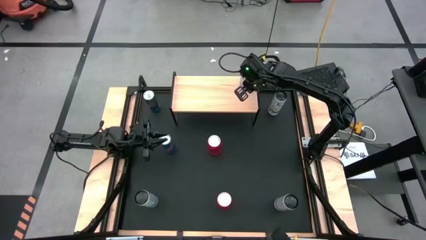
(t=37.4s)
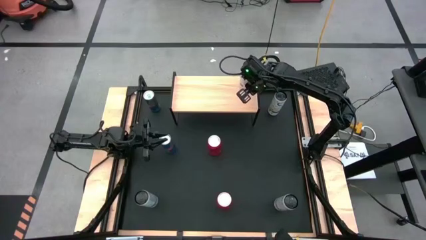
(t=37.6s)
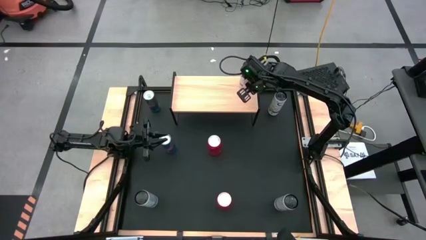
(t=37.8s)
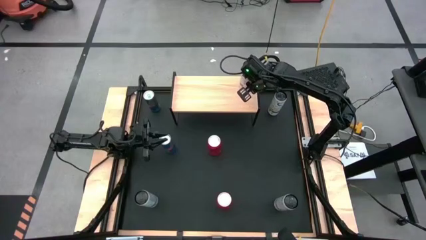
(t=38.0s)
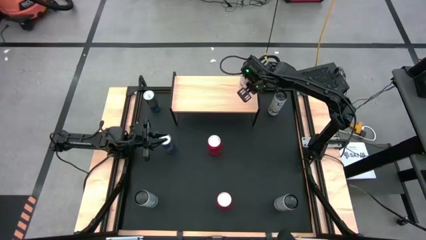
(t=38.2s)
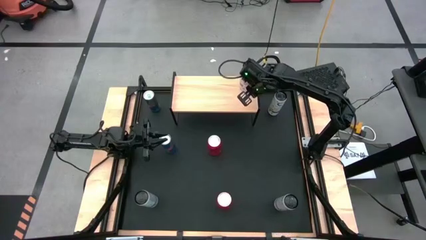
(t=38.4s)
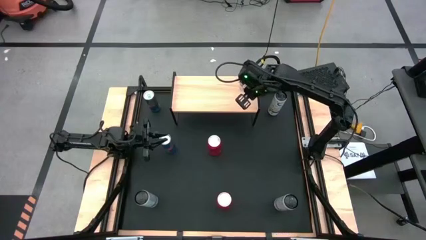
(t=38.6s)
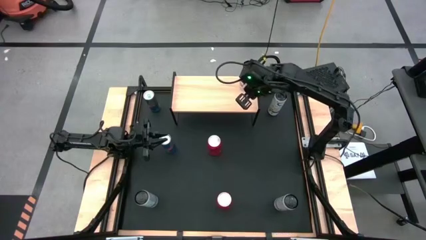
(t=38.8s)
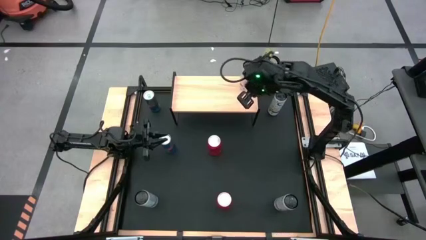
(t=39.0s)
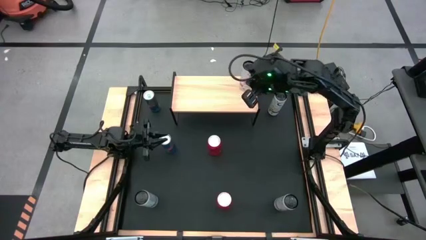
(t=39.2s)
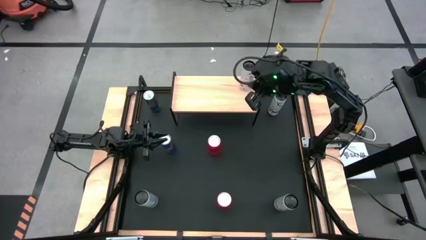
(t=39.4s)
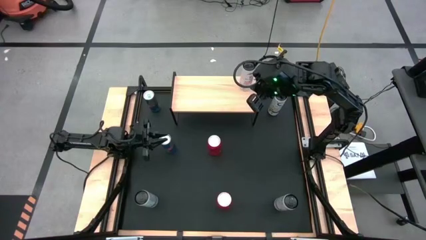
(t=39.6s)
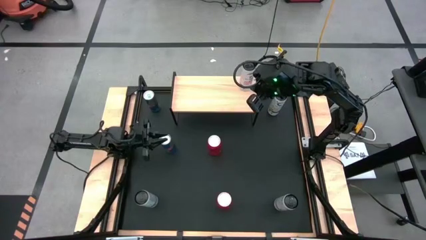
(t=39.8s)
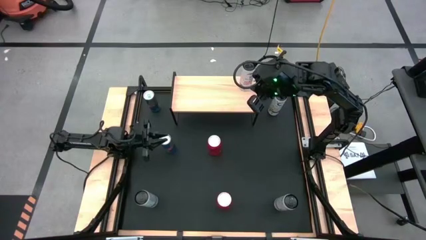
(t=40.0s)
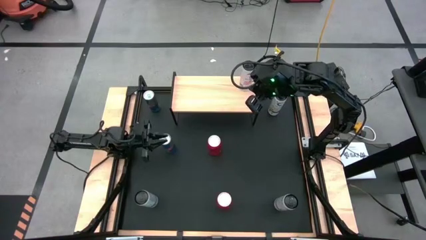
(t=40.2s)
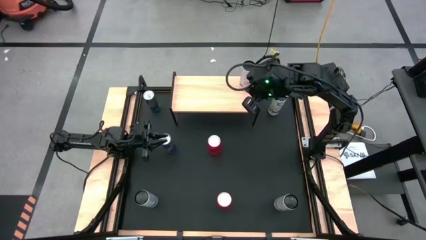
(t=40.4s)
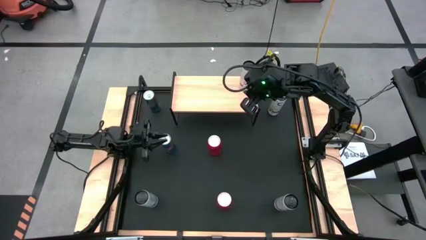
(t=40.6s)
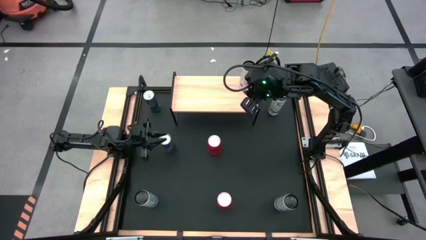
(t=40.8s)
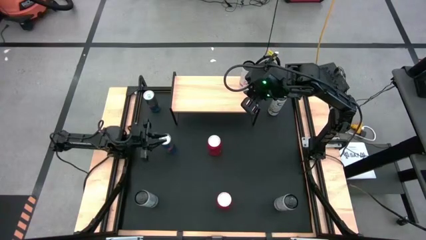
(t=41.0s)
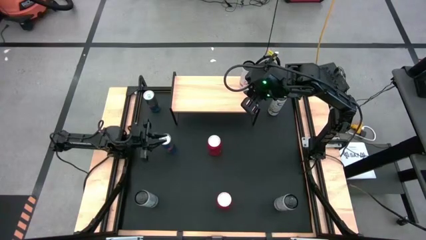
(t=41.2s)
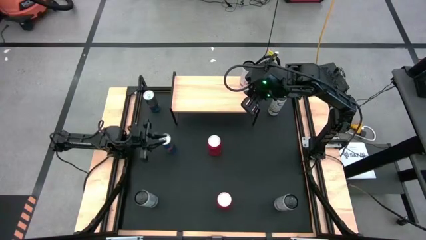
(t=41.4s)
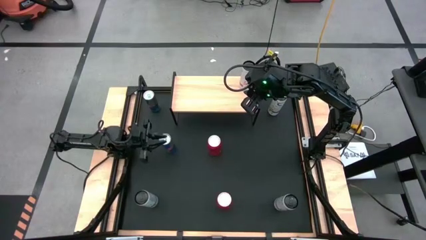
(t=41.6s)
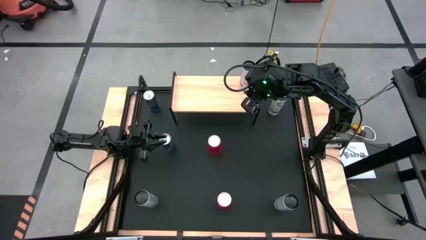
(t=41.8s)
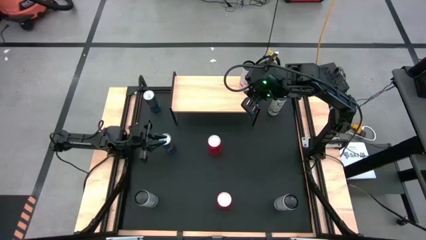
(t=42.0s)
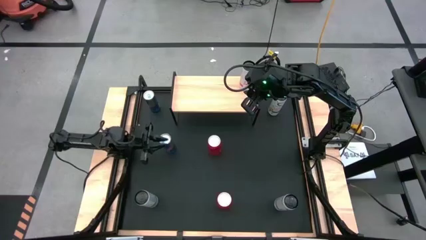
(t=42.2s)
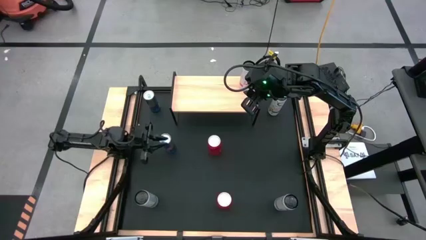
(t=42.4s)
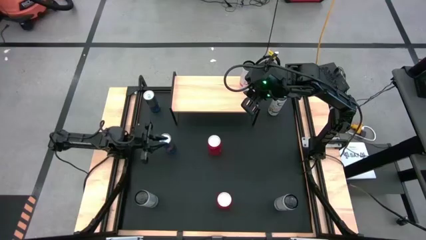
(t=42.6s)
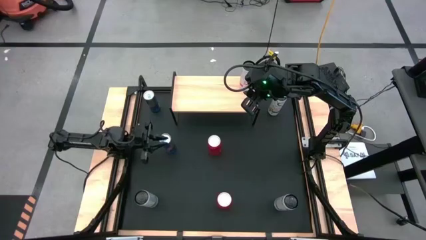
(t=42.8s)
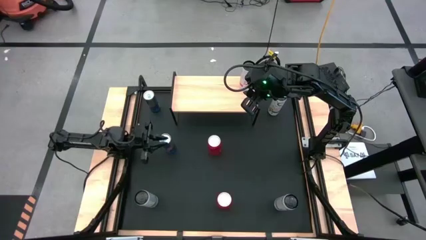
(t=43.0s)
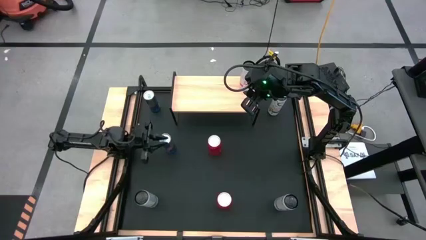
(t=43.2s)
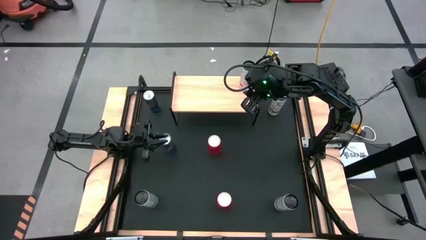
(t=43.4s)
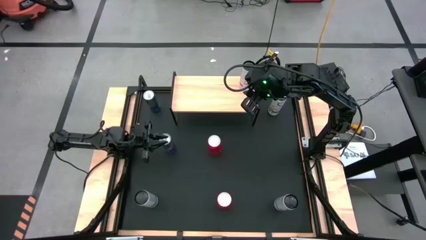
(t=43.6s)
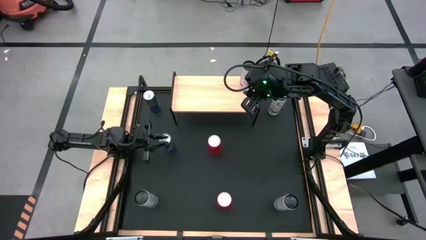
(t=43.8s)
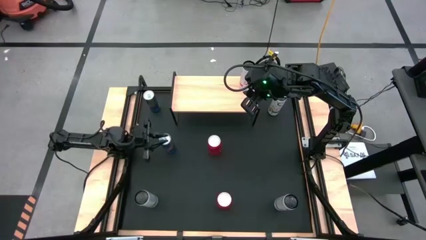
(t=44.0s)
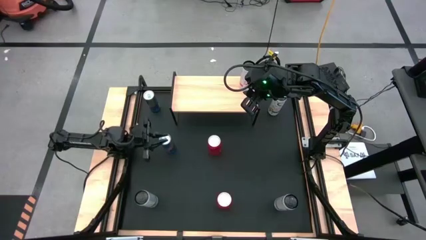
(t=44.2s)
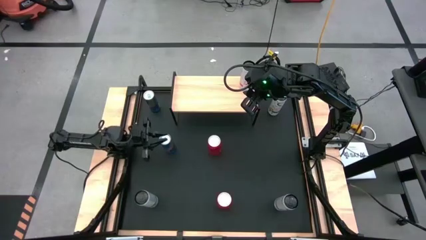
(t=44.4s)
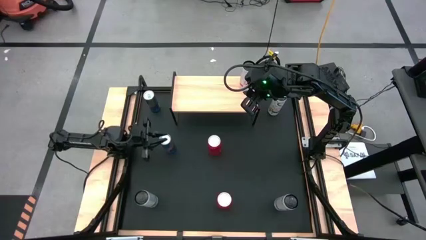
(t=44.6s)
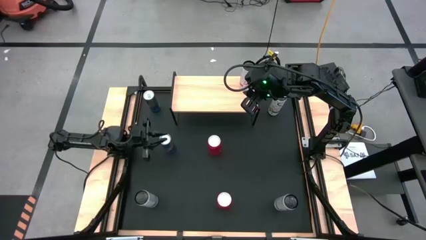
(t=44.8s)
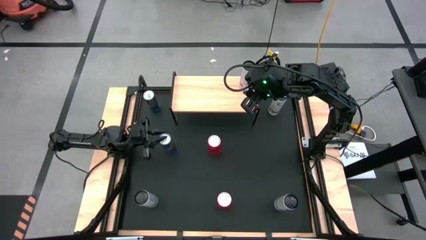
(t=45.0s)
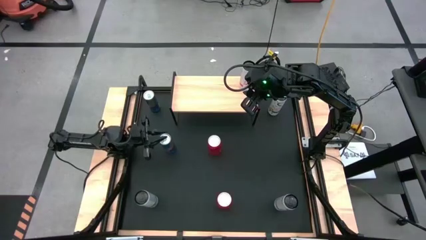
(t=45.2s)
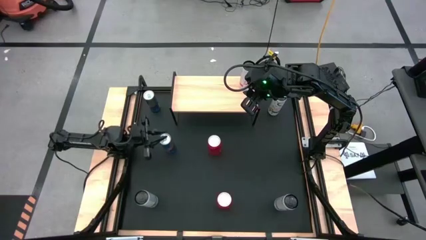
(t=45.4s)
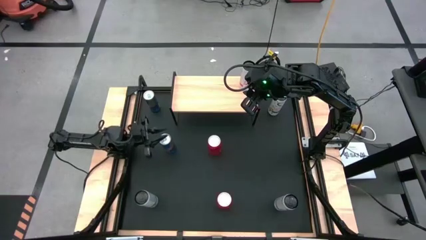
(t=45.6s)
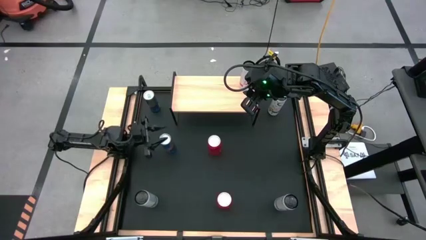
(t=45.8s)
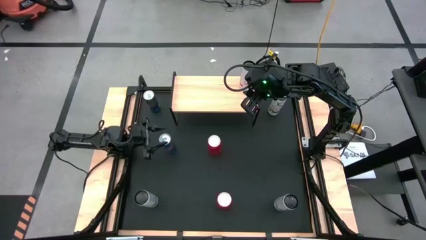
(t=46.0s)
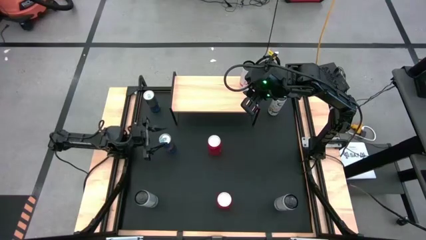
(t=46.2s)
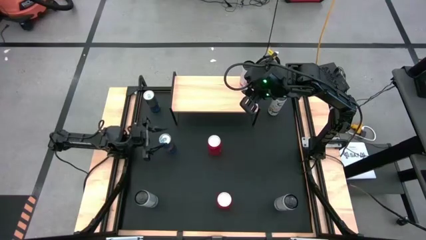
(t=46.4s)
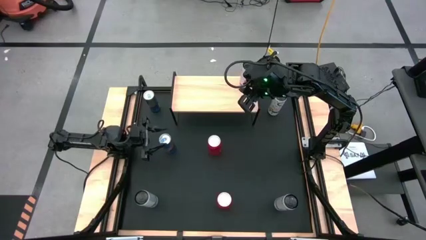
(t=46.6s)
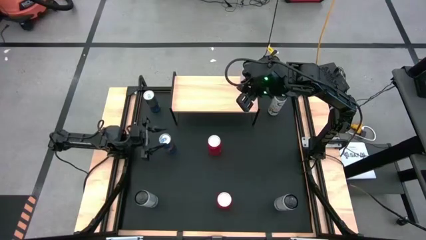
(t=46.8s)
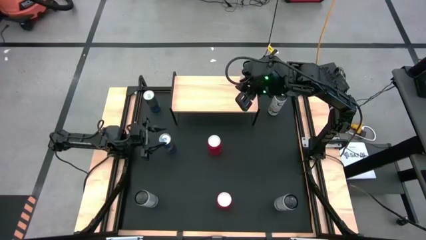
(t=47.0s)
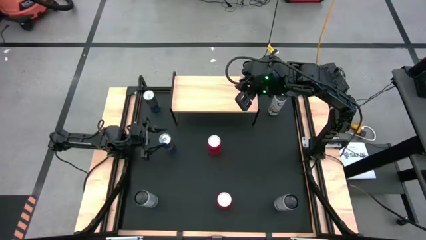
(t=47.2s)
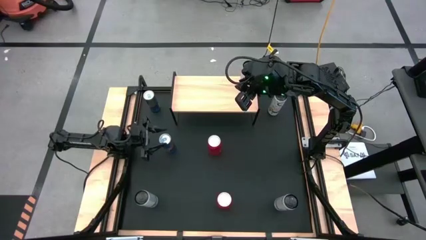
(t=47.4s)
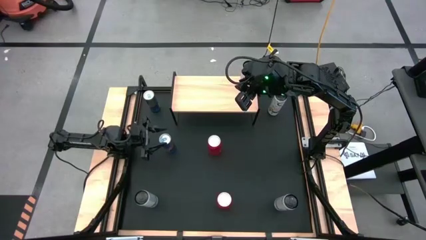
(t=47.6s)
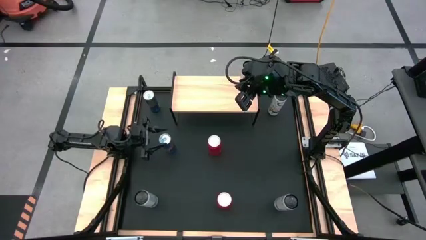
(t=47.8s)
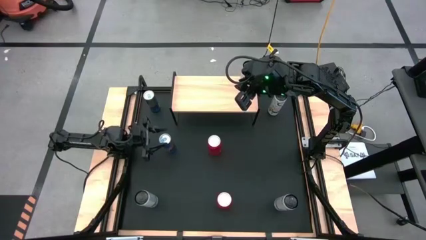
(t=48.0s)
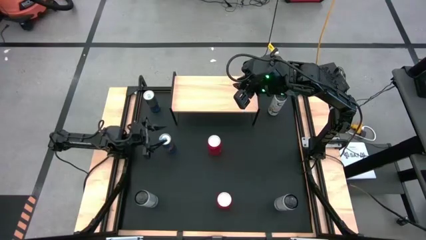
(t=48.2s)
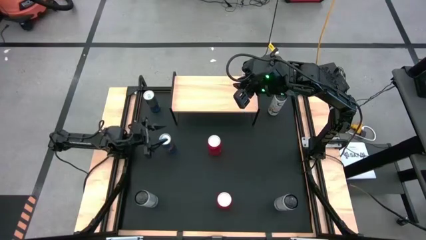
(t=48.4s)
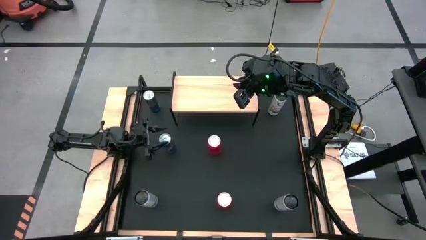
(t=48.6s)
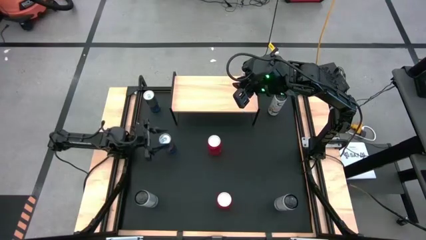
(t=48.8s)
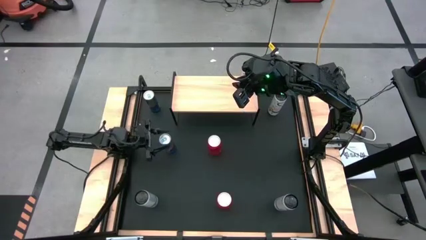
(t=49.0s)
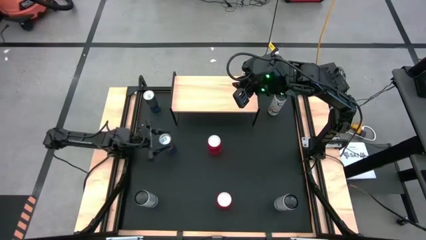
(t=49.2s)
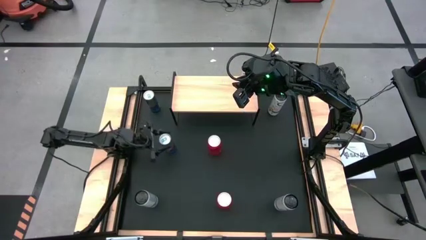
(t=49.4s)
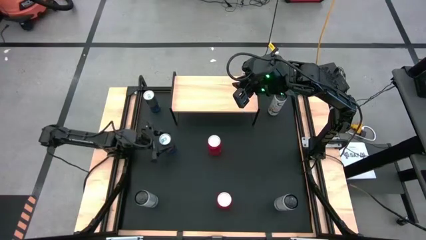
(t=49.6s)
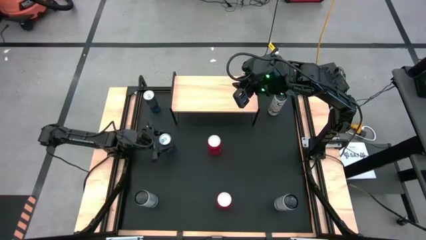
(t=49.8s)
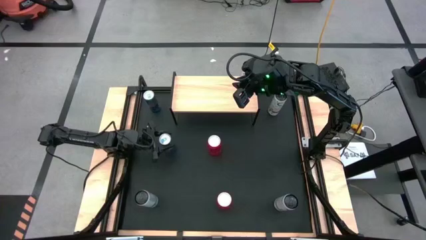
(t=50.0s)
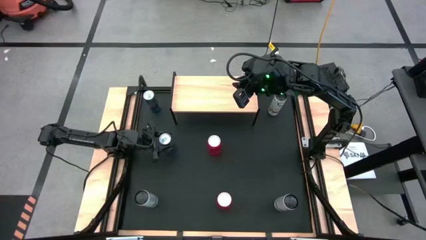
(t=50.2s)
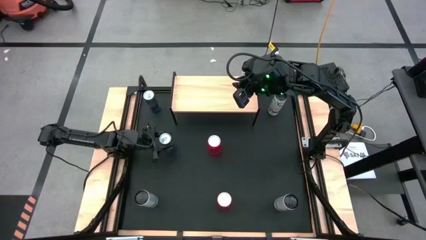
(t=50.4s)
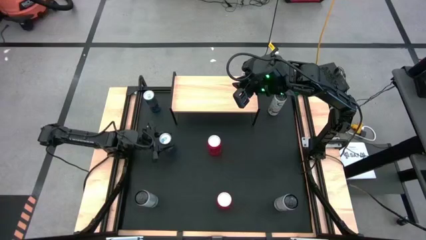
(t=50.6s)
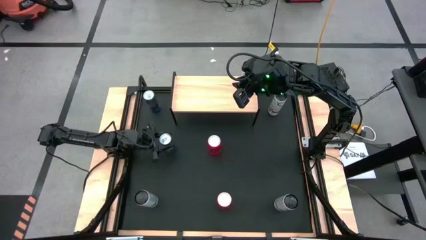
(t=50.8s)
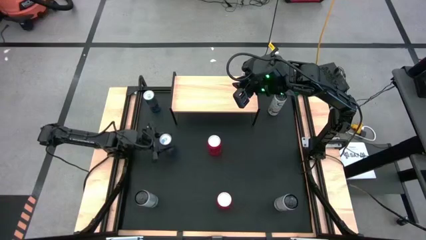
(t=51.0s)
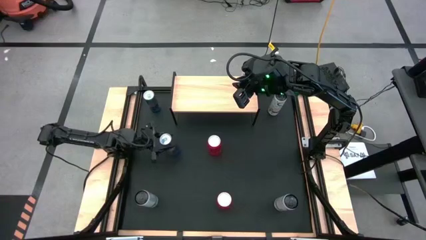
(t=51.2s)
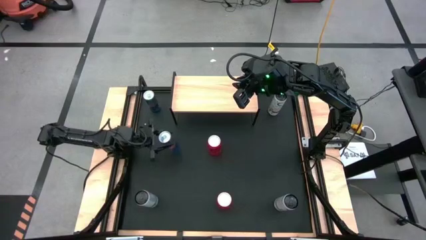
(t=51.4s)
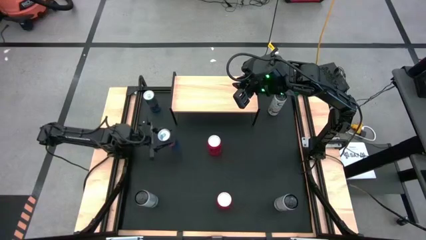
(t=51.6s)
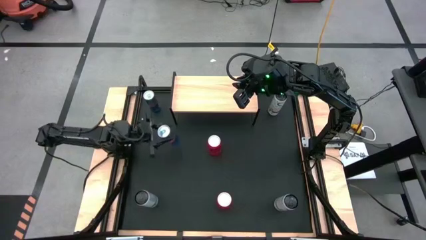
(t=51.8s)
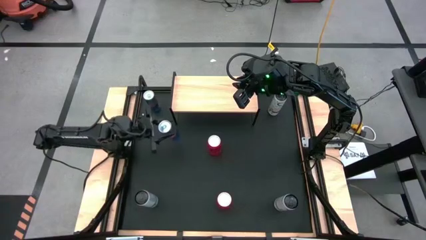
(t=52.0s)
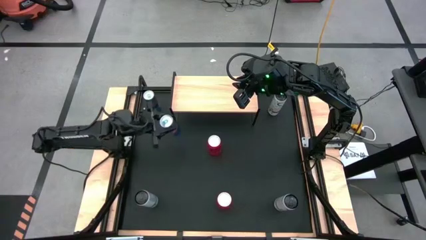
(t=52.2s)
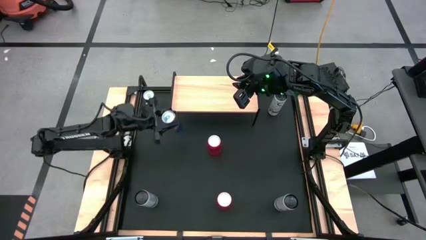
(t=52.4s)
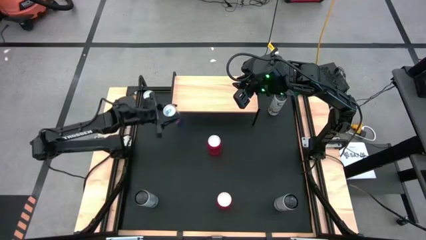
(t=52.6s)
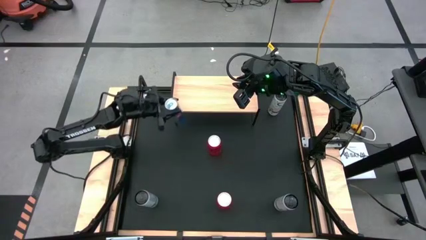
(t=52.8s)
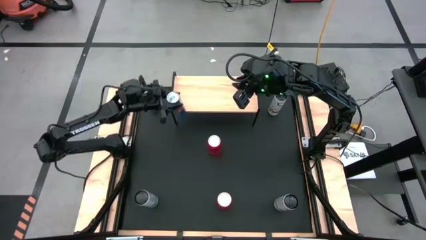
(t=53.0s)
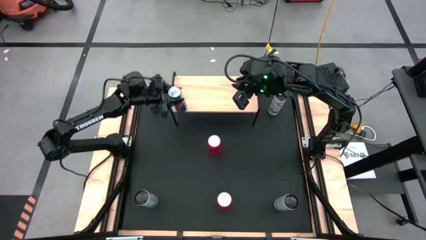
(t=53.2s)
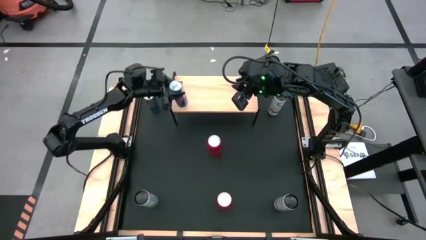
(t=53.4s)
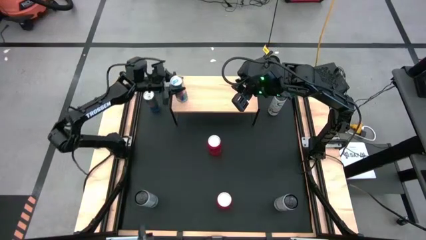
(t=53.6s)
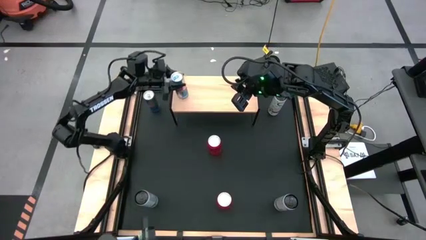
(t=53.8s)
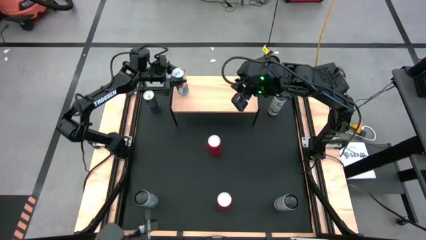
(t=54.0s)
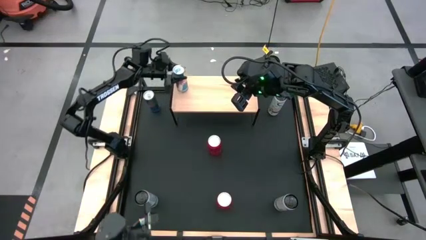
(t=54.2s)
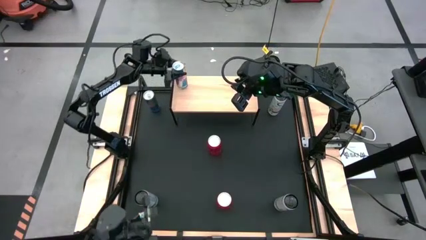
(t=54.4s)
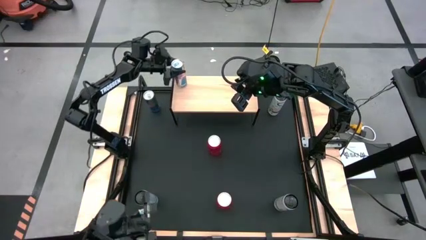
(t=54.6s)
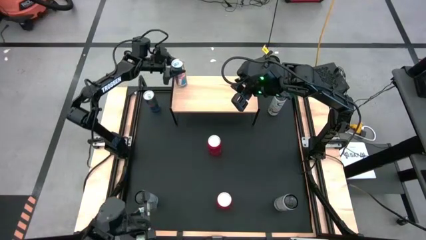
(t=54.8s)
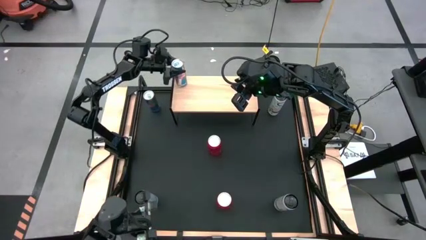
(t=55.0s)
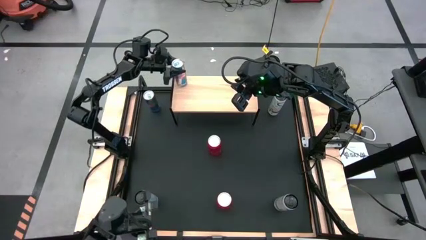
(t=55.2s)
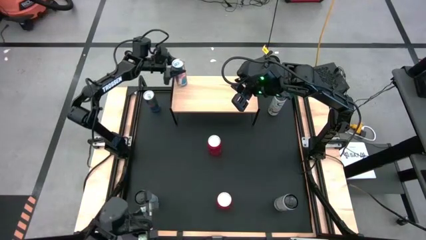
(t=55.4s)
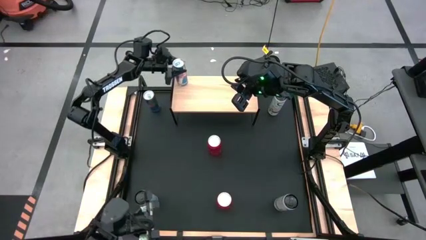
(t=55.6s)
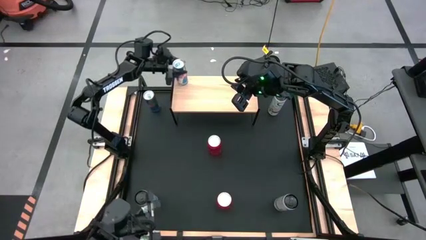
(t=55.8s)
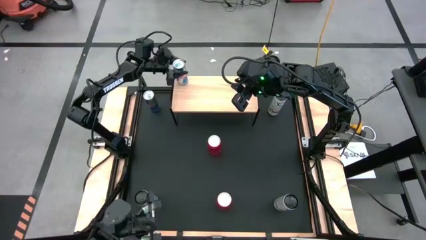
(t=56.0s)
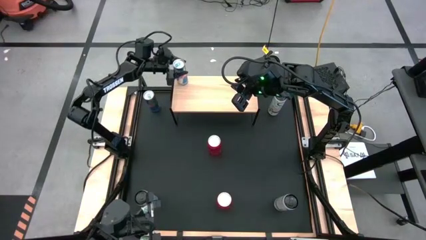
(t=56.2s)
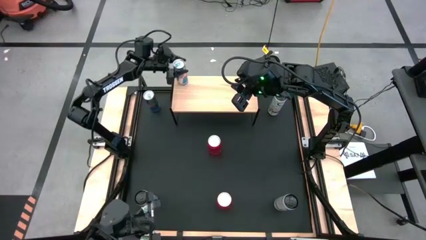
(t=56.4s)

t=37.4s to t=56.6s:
Task: Place canned beverage on shelf
Put the bottom blue soda can on the shelf
